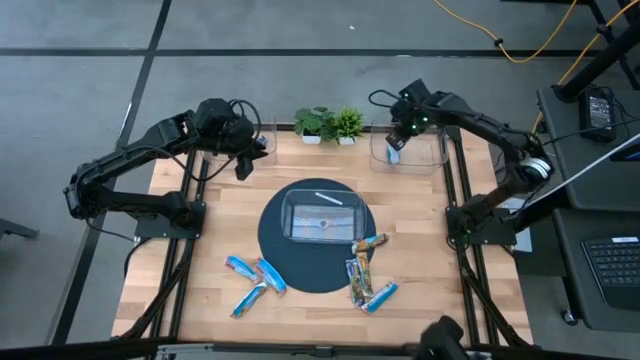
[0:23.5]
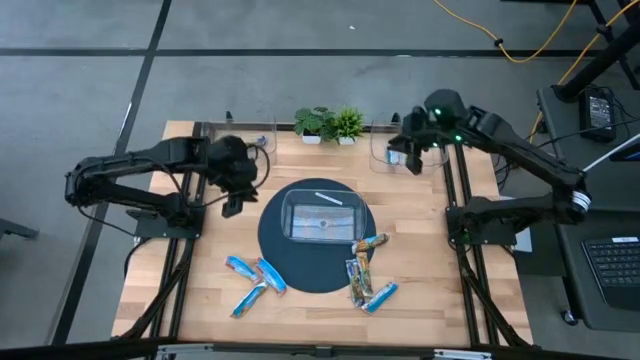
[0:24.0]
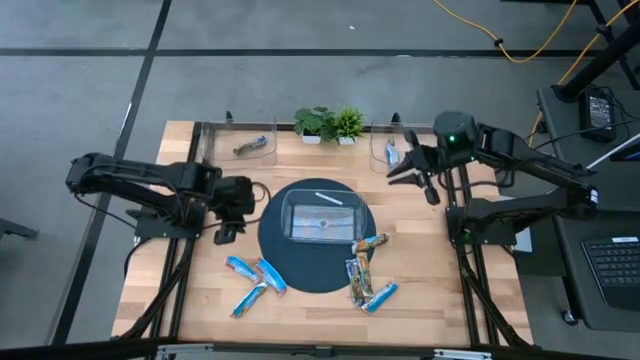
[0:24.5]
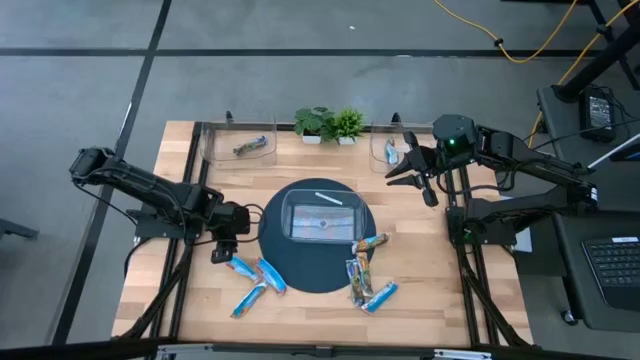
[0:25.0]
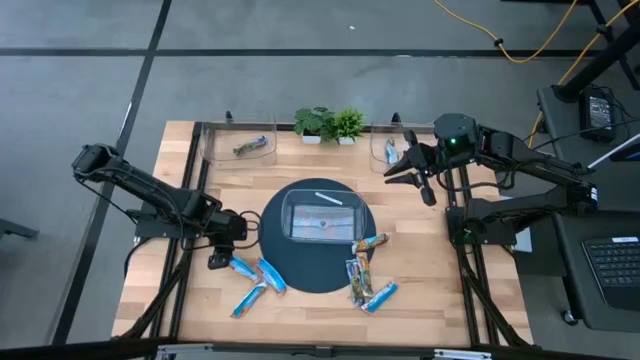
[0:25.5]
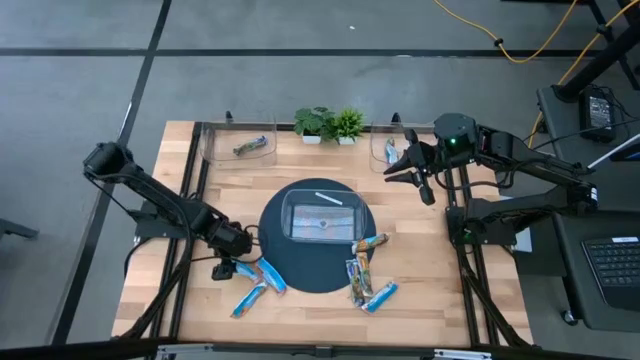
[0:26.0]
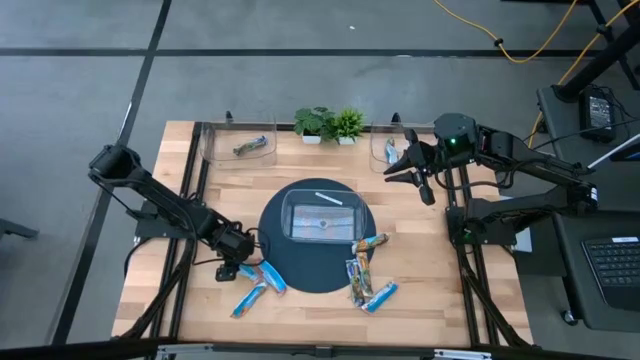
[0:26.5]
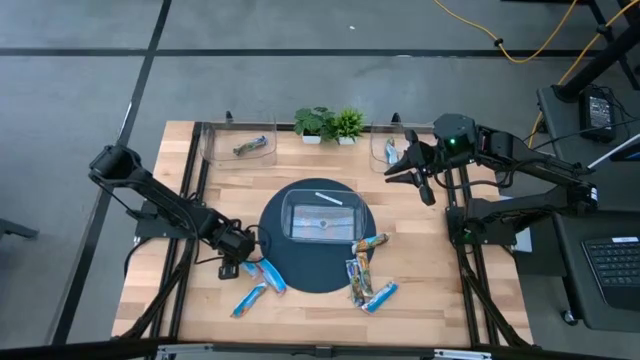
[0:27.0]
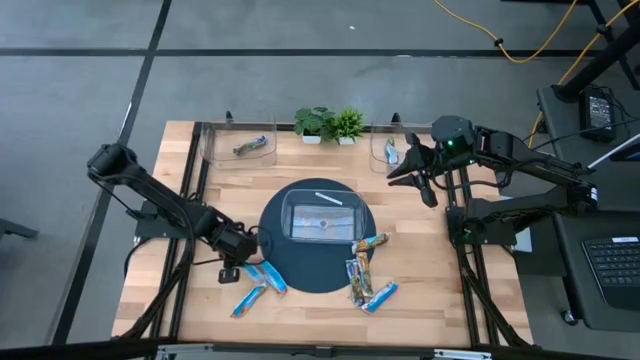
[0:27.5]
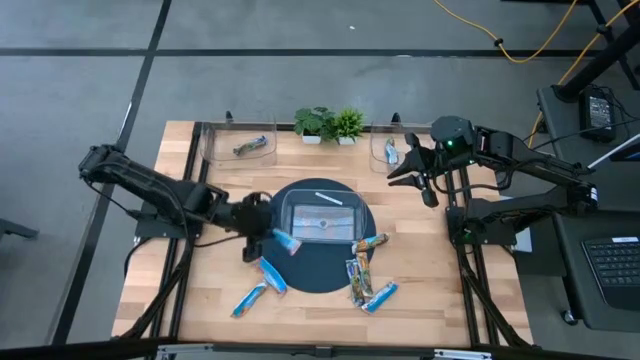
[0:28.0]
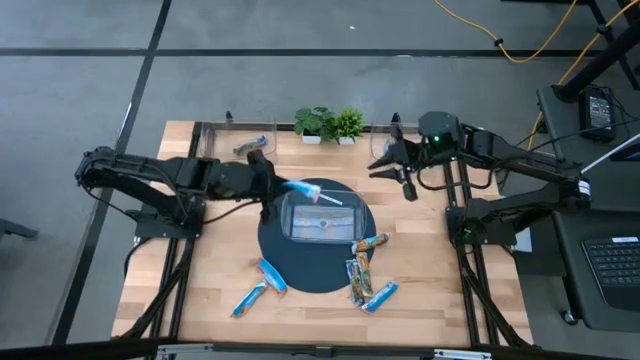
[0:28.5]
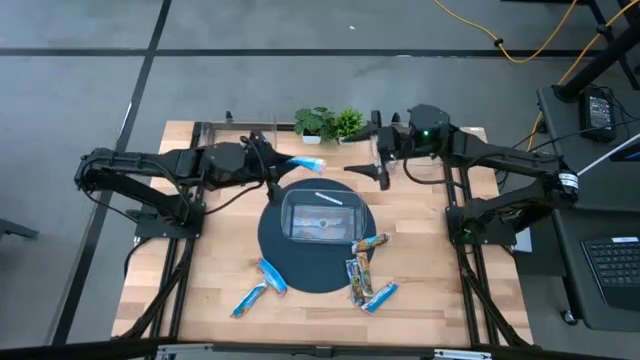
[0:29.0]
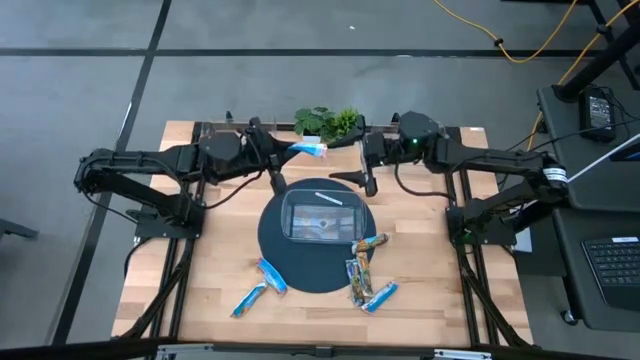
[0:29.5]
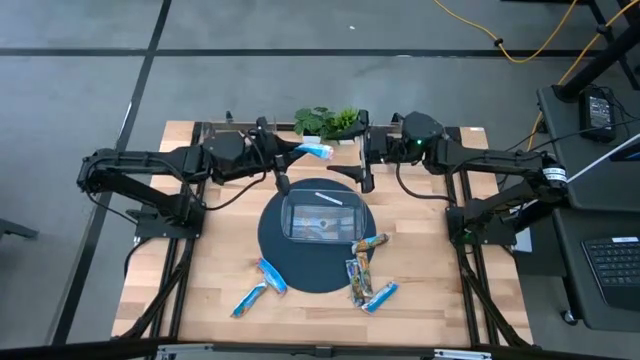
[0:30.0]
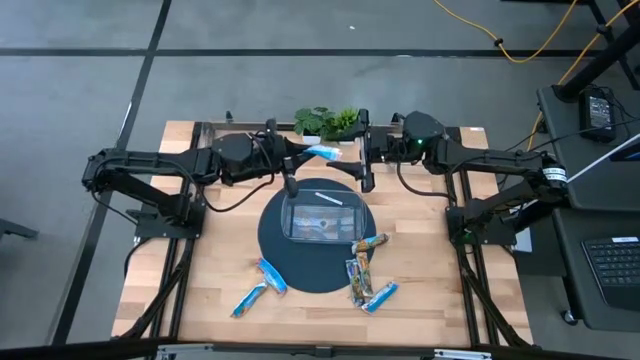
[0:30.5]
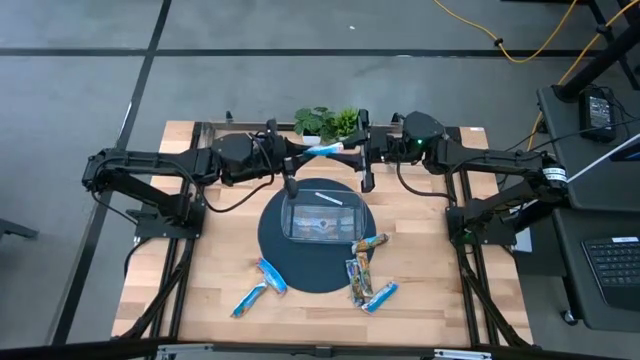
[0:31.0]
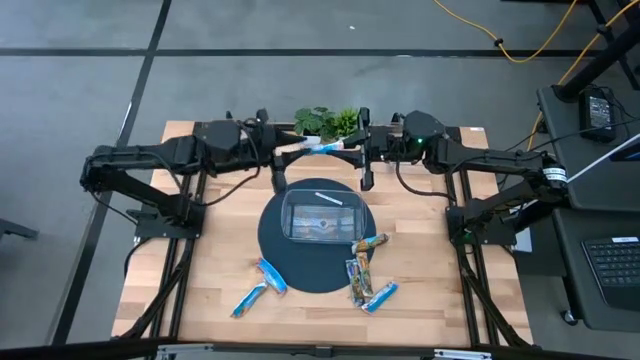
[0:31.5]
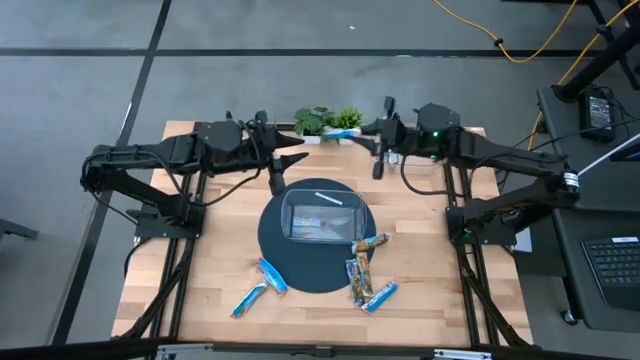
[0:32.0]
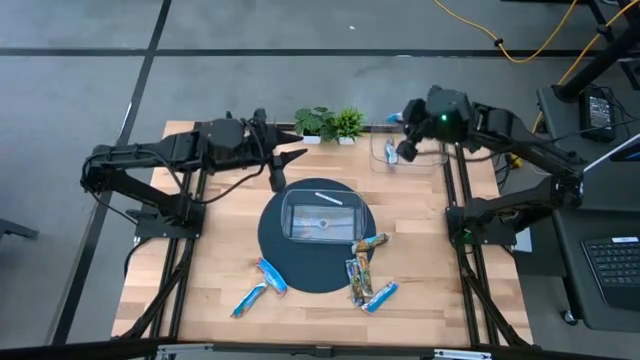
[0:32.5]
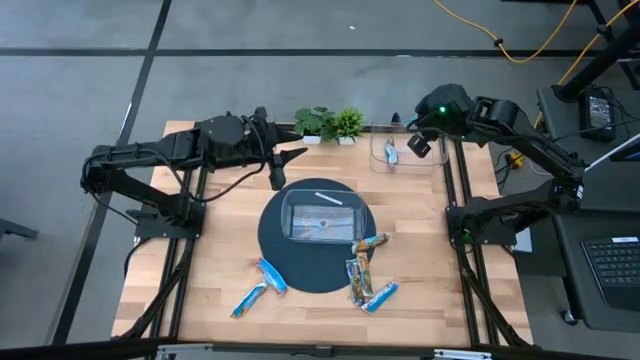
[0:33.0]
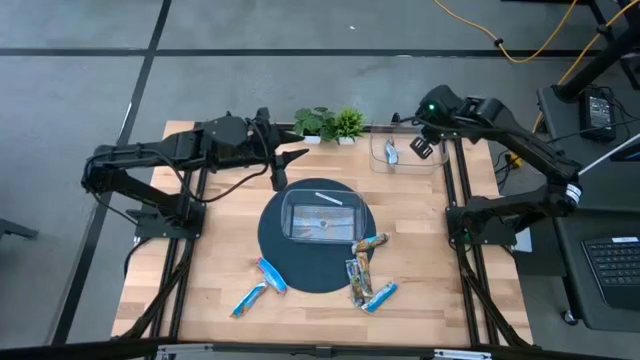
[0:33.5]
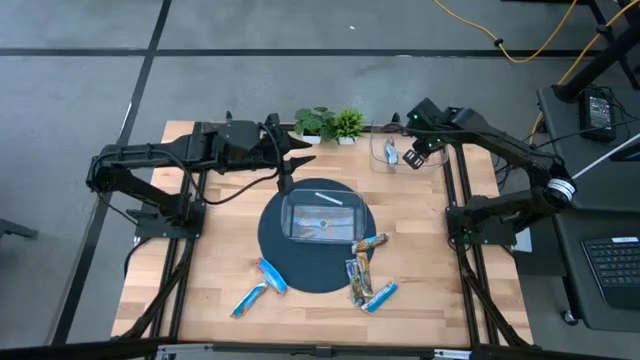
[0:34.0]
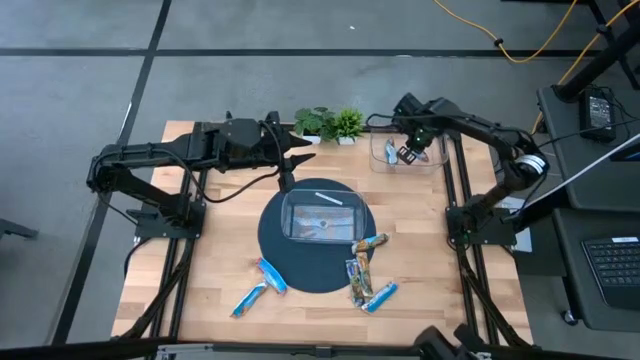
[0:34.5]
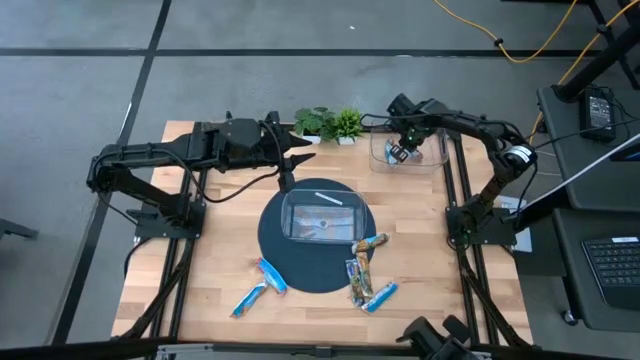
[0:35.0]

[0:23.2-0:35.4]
Task: Pick and place Granola Bars by type
Put the red granola bar into the top right transparent bin

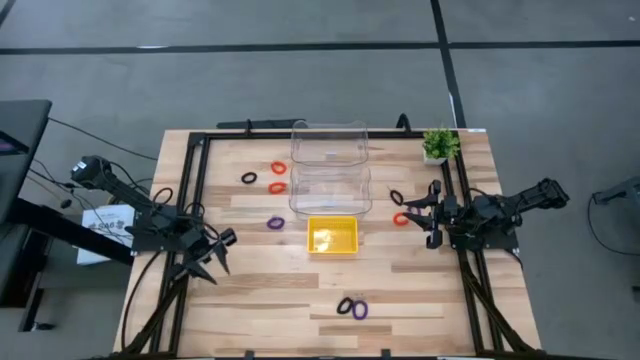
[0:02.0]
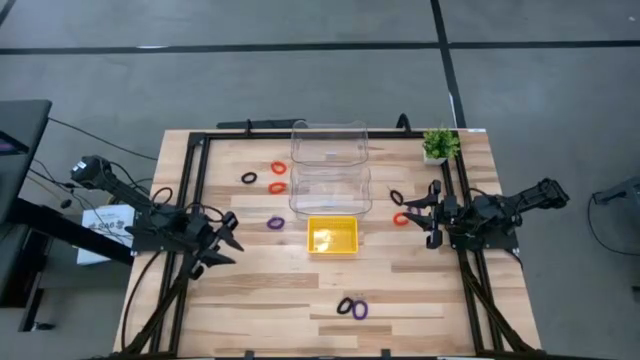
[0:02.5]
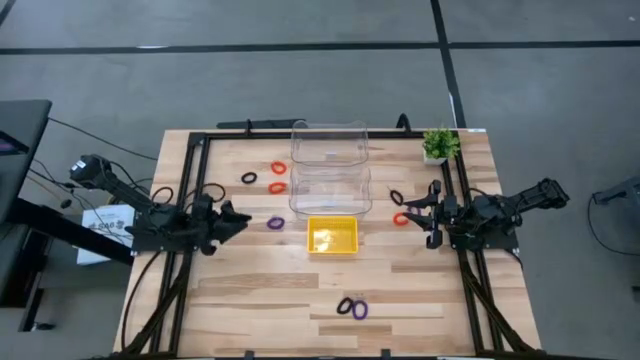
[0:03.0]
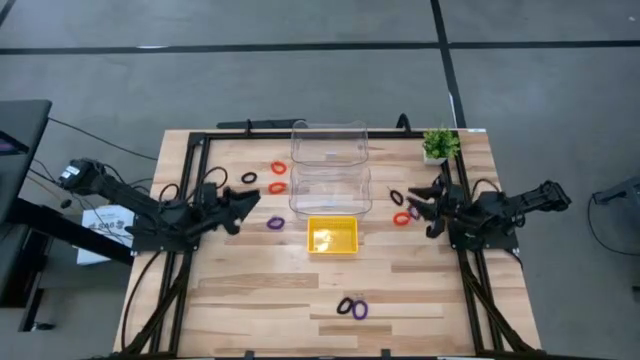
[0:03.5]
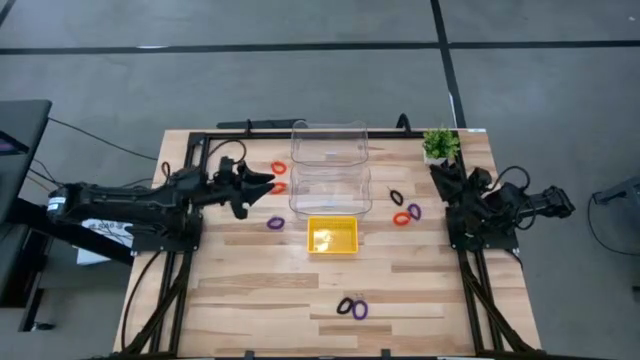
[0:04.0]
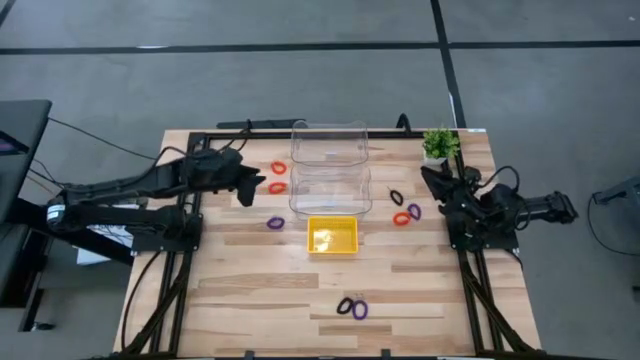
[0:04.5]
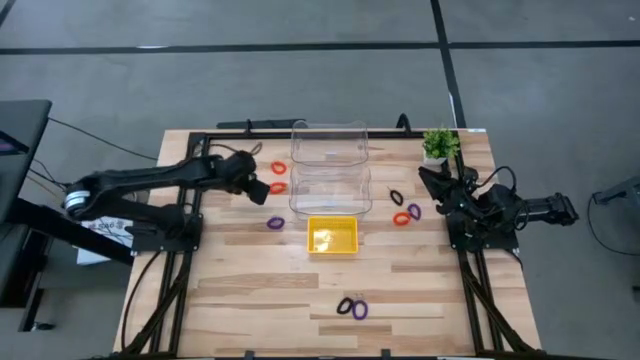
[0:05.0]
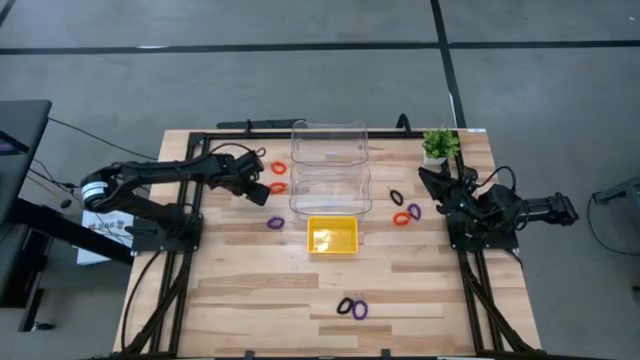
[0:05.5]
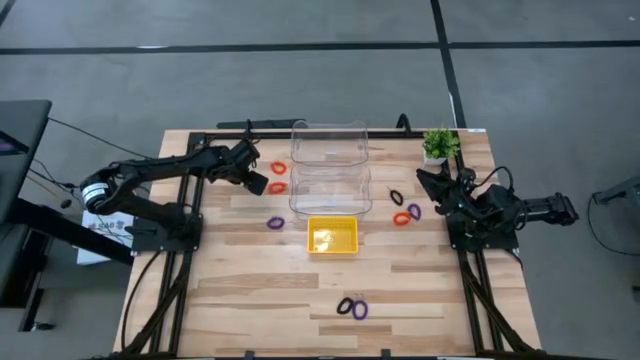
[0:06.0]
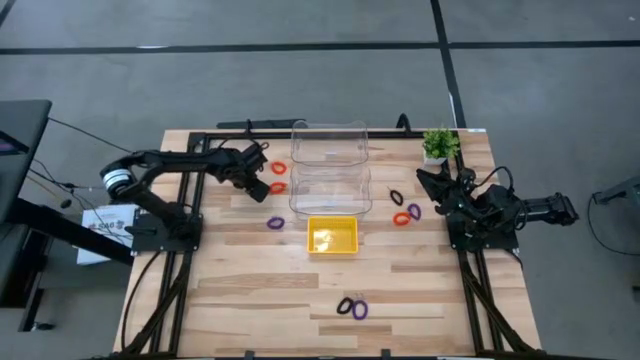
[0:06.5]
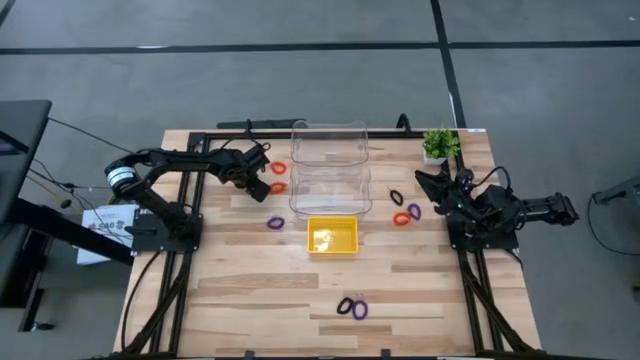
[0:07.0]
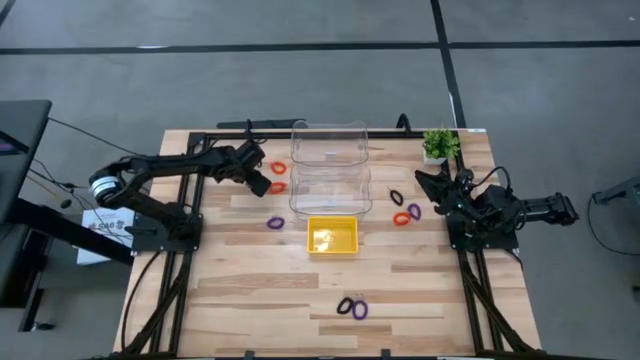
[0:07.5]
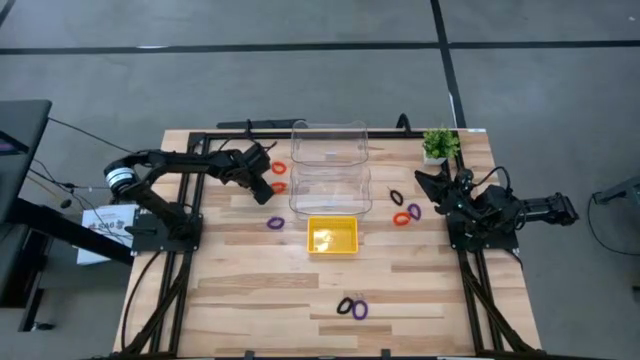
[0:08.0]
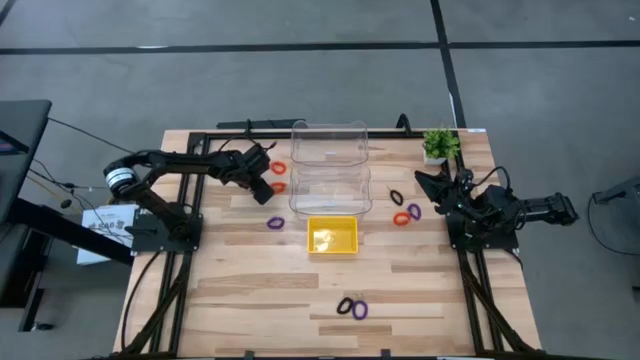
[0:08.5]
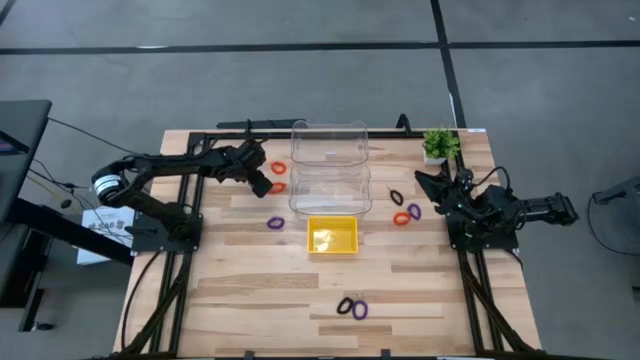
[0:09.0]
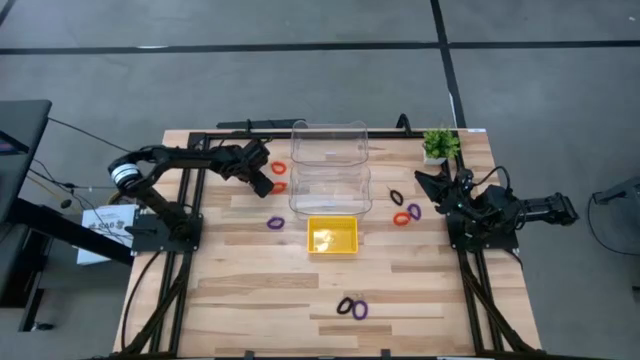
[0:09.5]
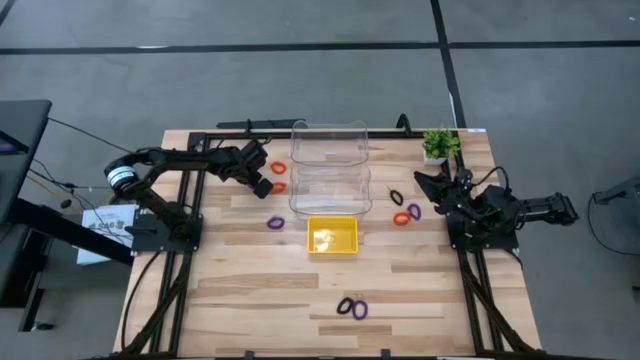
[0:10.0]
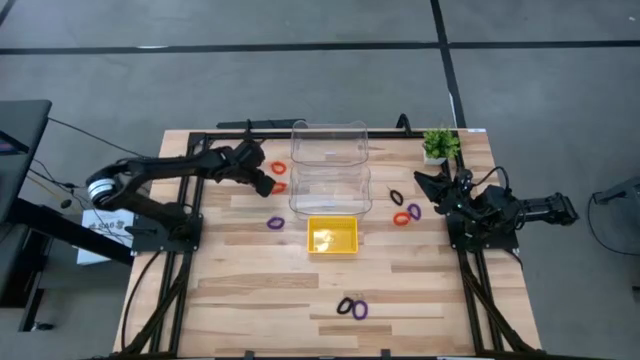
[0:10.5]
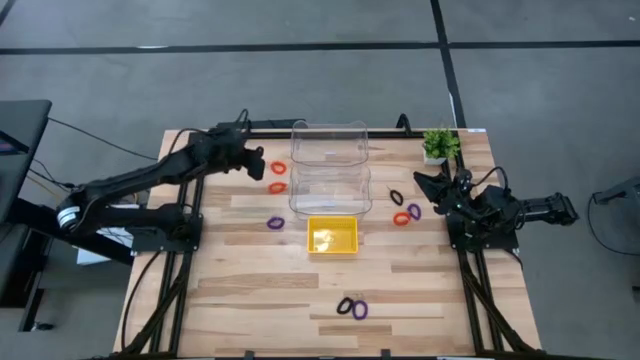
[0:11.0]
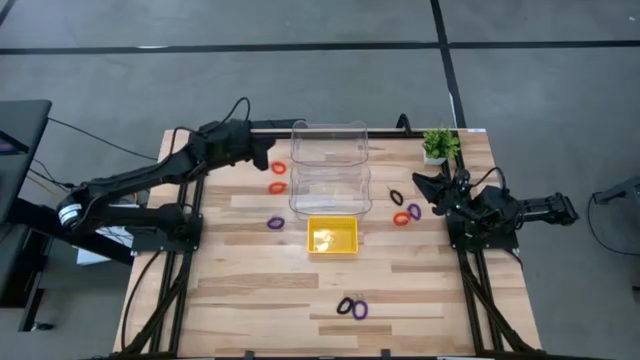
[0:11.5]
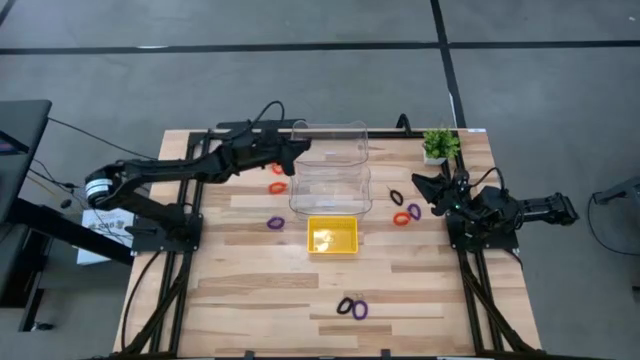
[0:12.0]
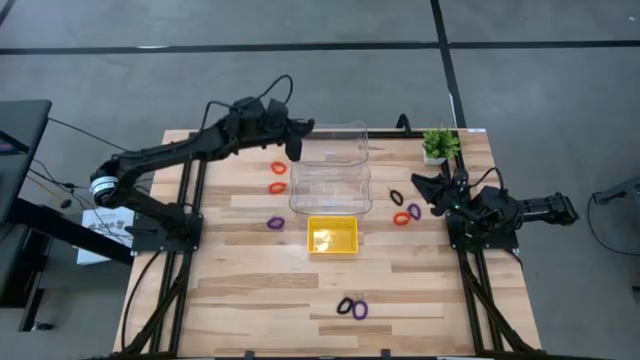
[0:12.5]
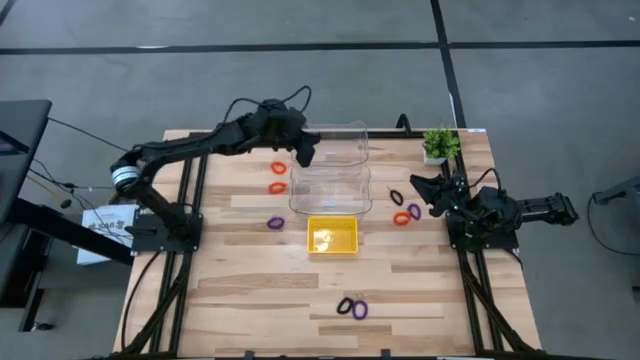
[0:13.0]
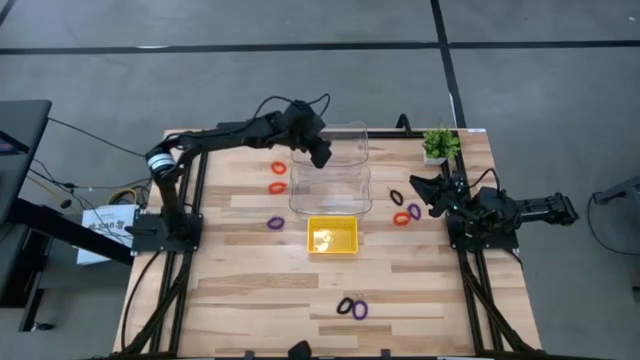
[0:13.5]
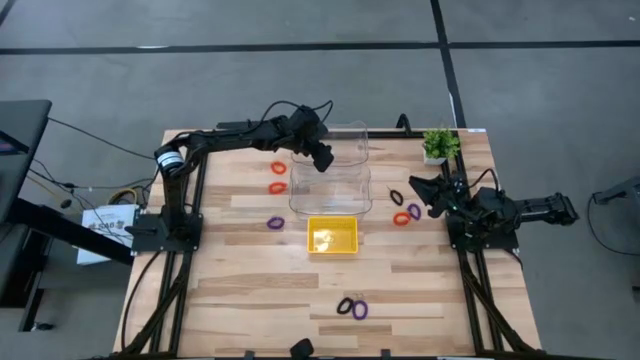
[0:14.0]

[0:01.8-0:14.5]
Task: Sort spring keychains
Put the top left black spring keychain into the top transparent bin
